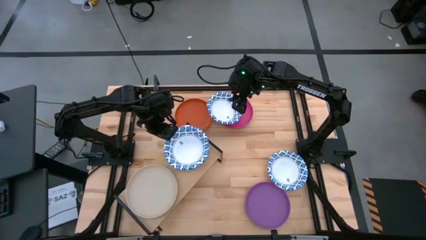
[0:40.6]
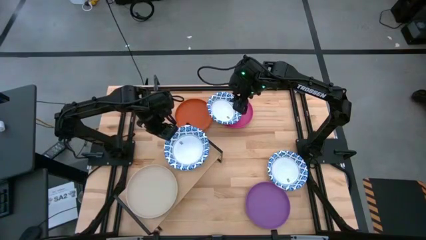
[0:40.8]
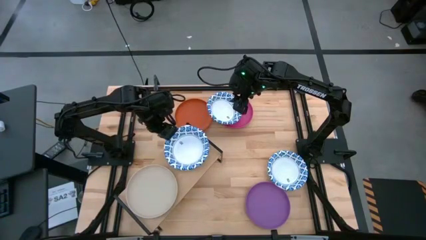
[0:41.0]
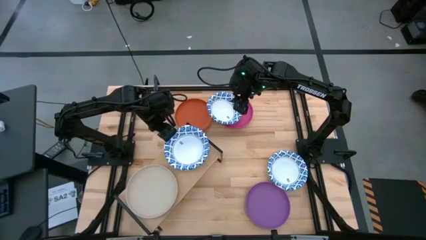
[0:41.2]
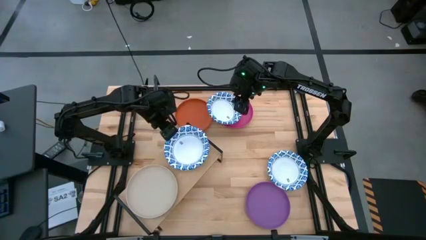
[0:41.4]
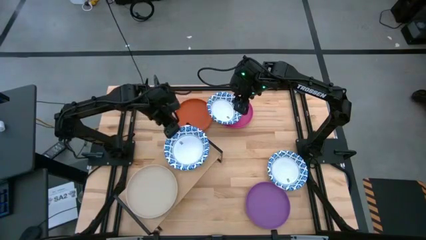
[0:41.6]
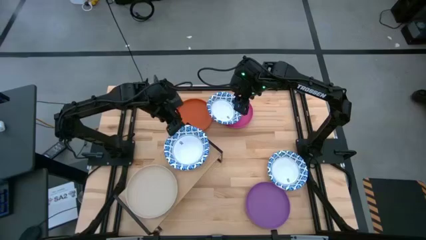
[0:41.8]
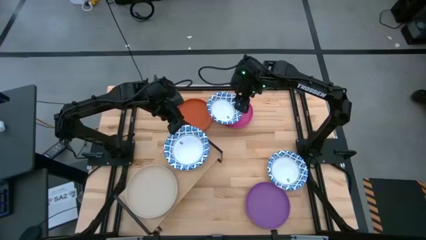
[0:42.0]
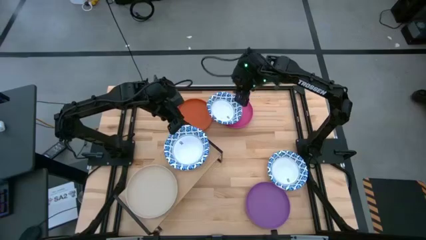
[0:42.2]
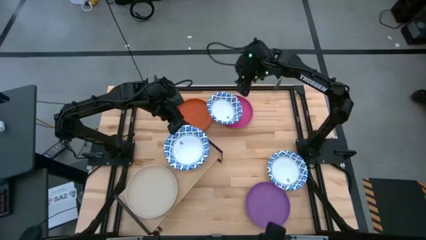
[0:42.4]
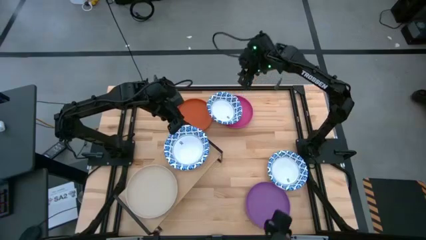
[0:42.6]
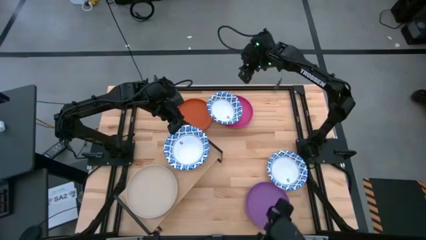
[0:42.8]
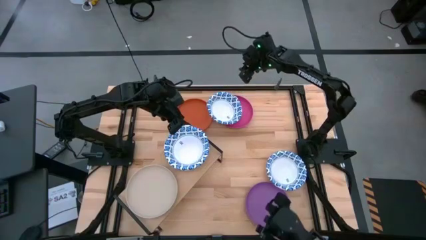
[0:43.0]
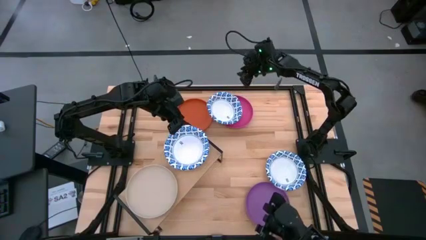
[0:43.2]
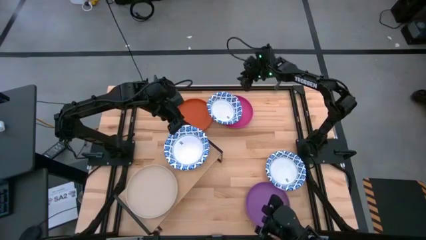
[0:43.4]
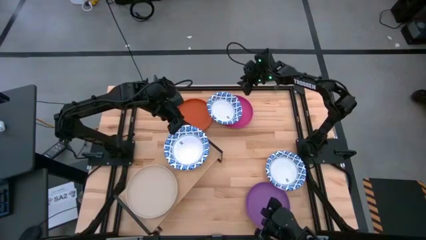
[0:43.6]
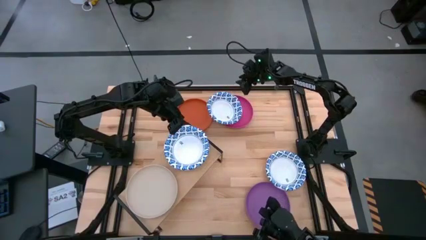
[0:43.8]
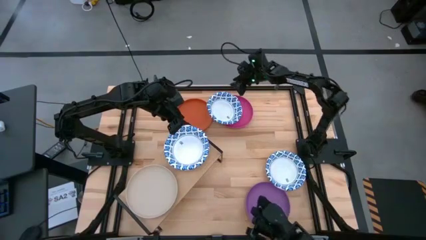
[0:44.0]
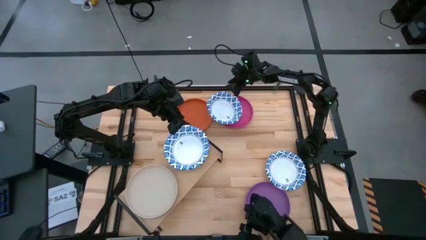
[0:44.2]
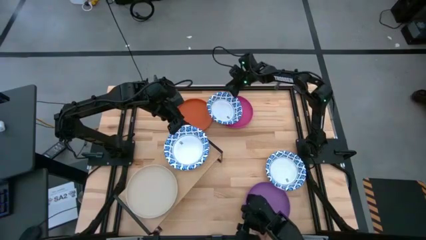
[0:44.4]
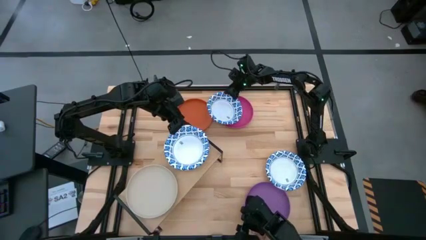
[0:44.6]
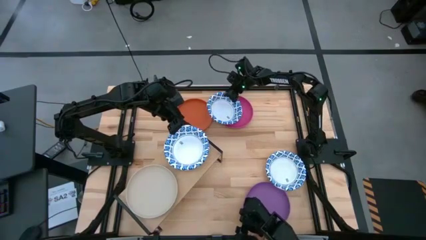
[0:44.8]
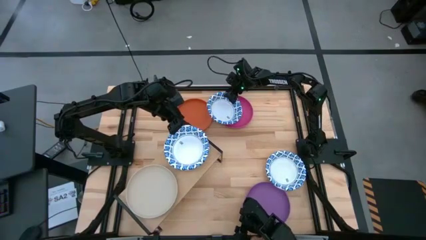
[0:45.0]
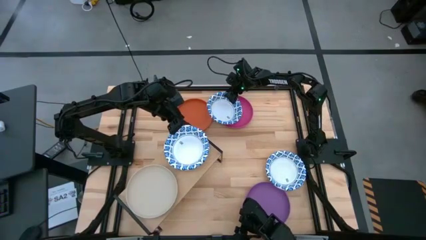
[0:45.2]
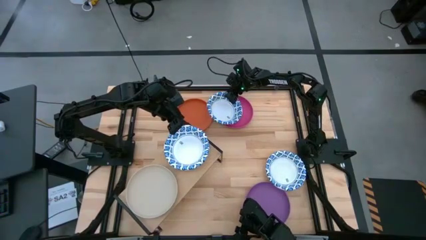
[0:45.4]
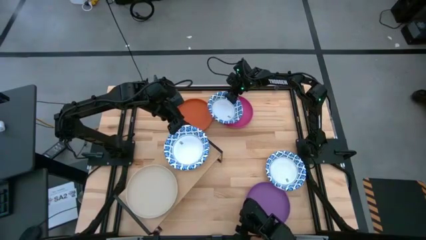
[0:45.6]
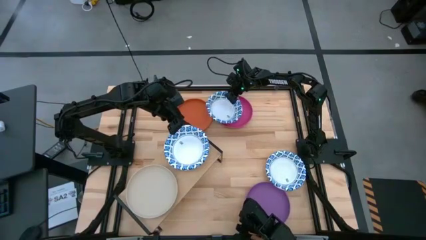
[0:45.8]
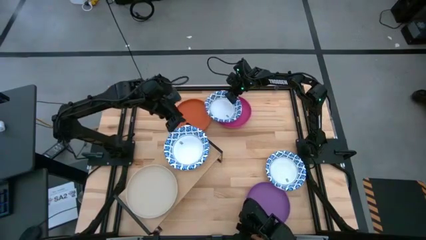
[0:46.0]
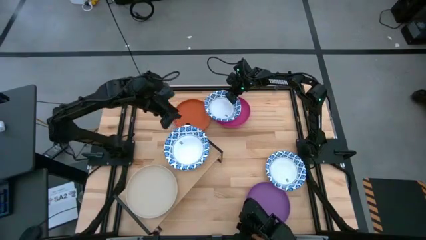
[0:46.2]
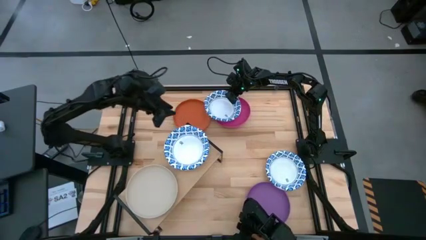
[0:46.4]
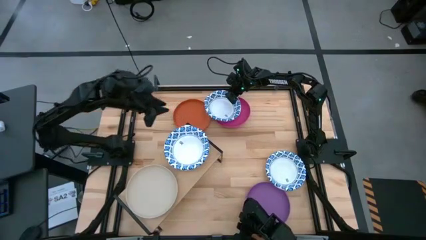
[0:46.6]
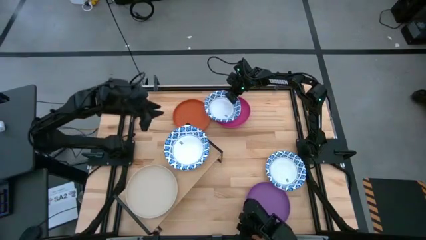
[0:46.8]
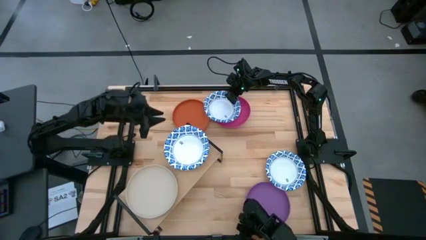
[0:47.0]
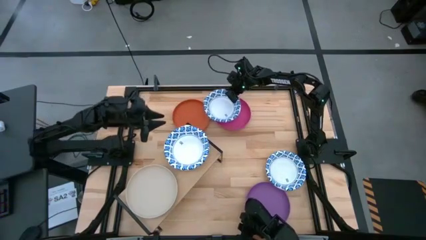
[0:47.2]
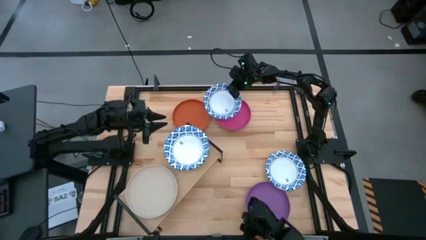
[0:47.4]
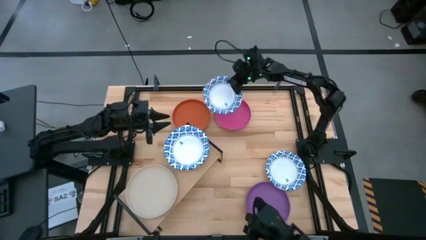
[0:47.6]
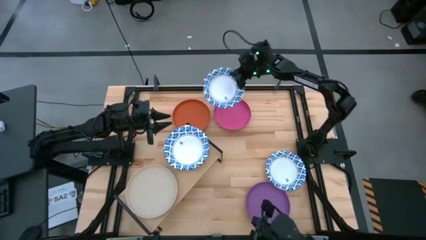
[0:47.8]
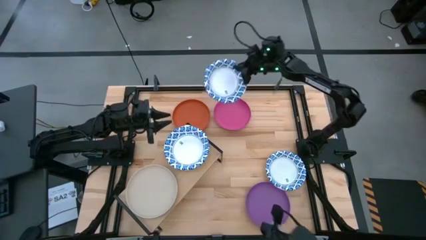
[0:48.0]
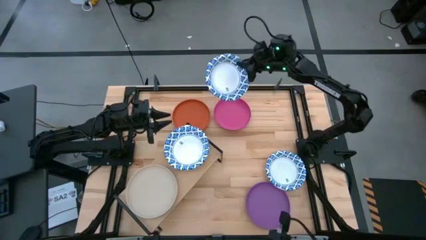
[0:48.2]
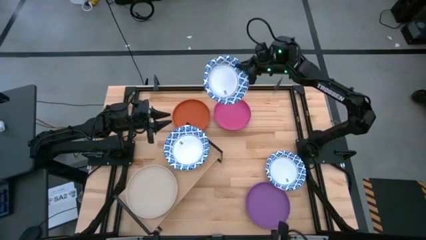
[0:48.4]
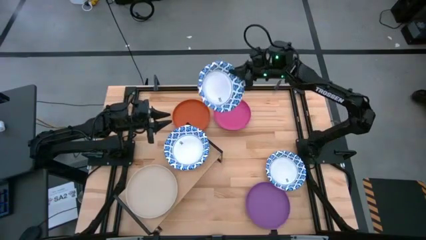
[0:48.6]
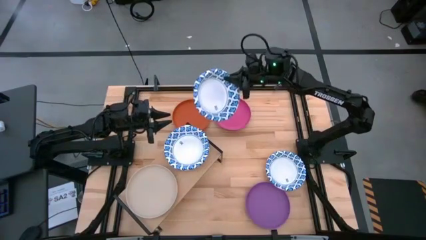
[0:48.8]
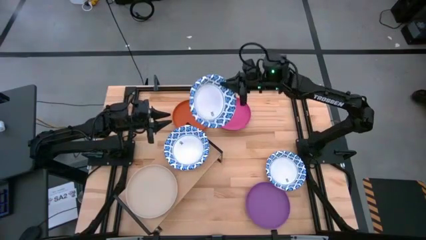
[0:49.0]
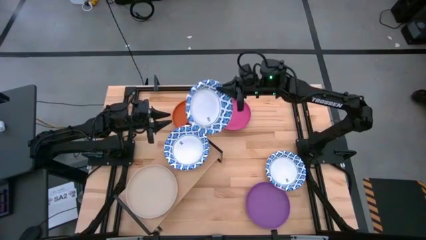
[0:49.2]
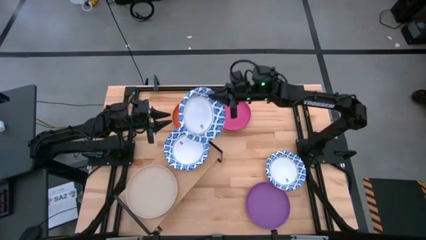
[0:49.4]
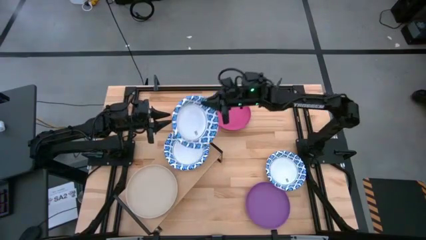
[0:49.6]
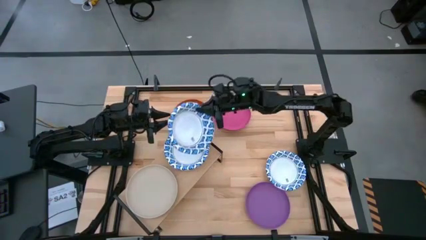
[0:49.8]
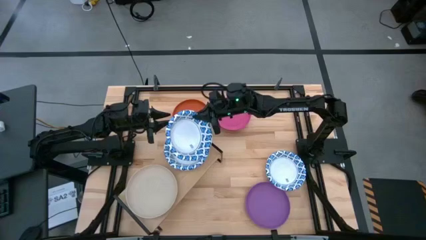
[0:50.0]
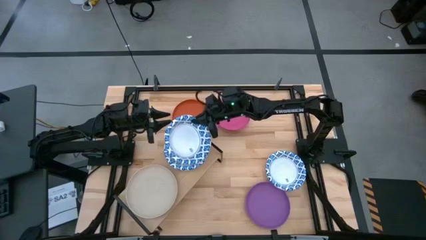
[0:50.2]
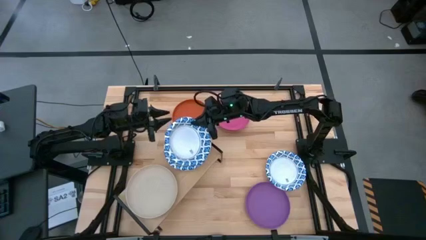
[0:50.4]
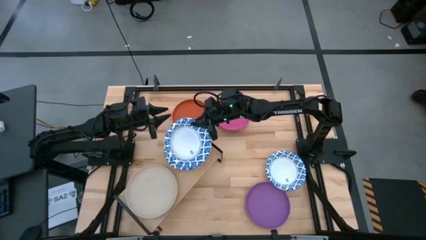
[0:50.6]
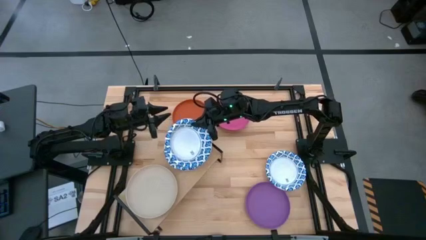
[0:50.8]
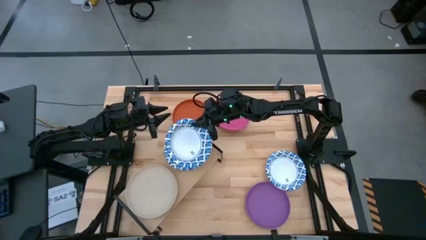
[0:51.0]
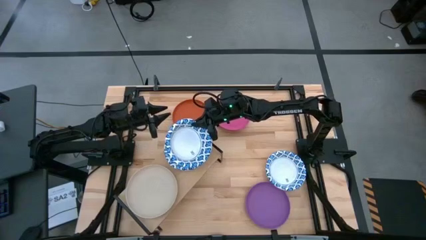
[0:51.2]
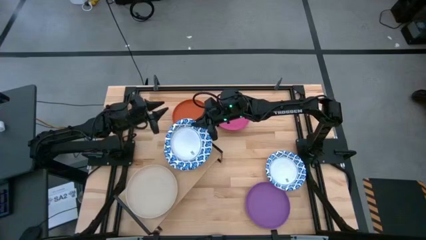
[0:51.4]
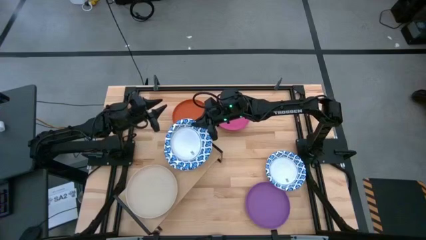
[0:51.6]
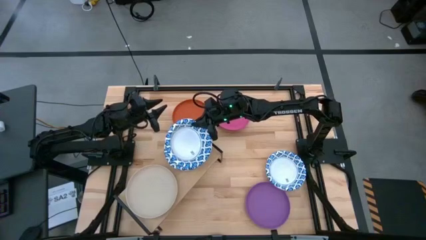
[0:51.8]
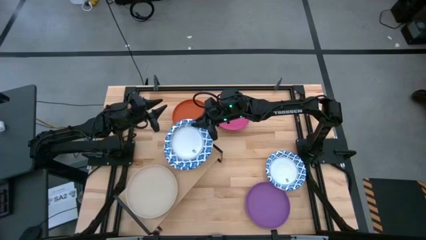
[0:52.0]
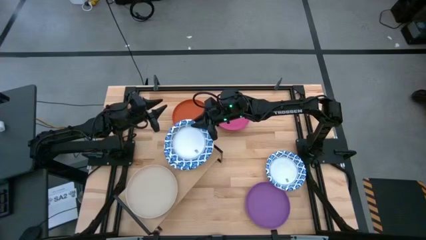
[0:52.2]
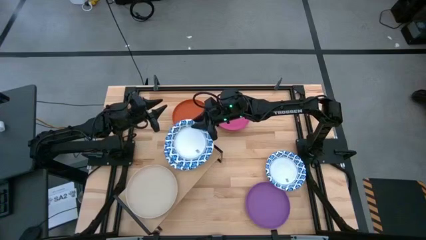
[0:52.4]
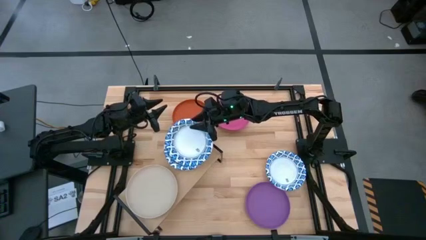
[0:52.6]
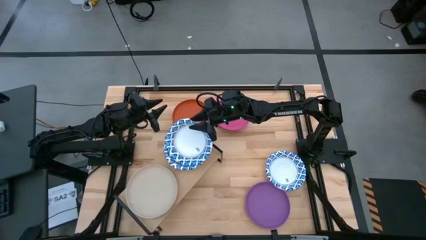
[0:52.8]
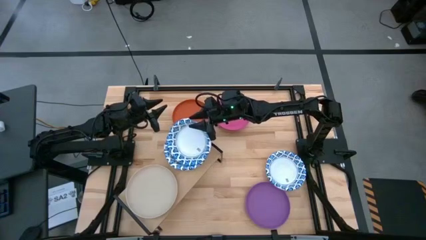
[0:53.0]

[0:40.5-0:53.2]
Task: Place and stack plates onto a shelf
Stack the white bowl on top of the other white bowl on the shelf

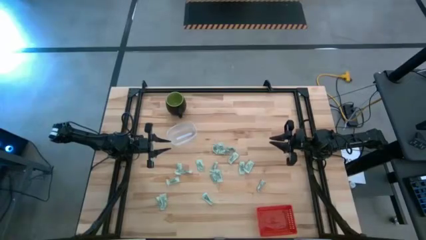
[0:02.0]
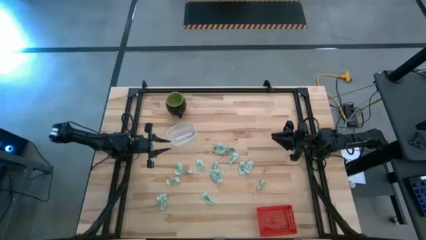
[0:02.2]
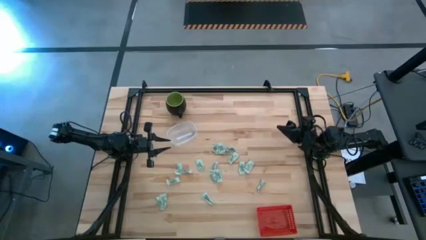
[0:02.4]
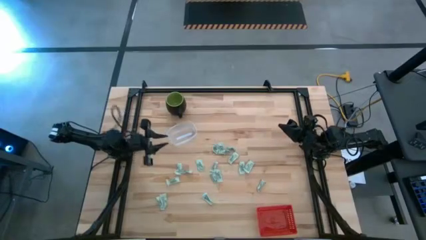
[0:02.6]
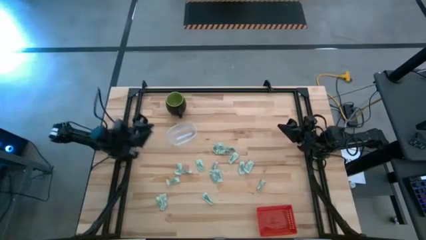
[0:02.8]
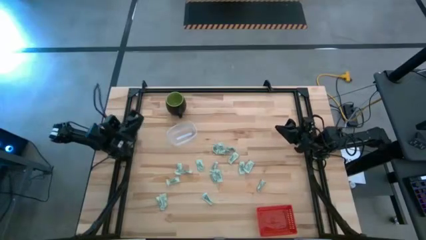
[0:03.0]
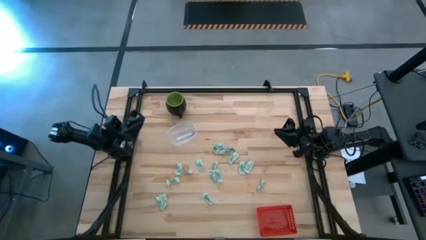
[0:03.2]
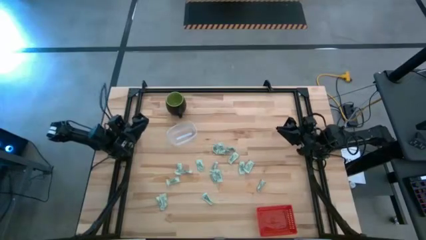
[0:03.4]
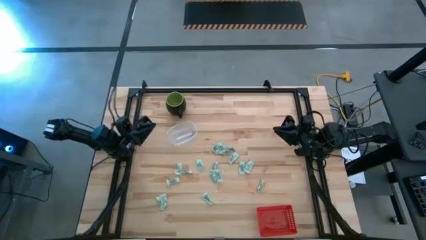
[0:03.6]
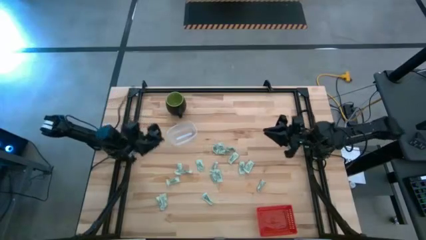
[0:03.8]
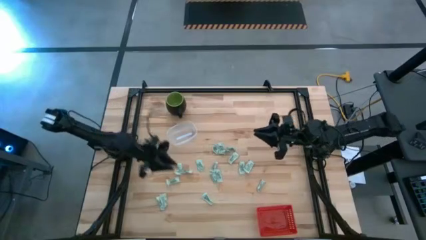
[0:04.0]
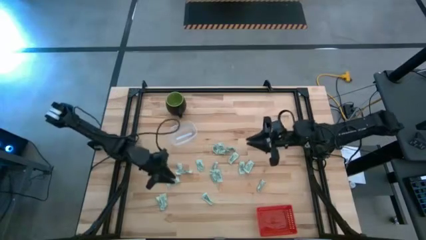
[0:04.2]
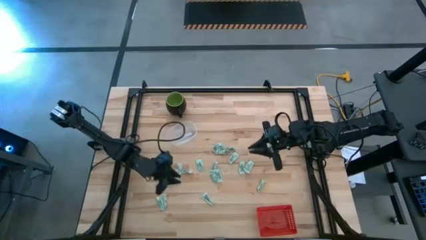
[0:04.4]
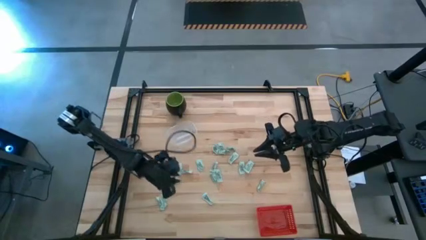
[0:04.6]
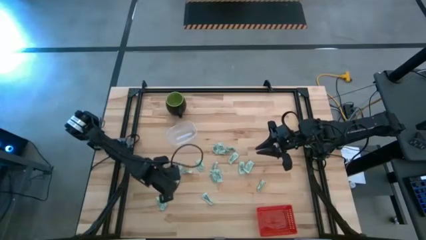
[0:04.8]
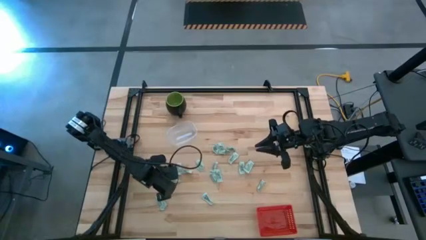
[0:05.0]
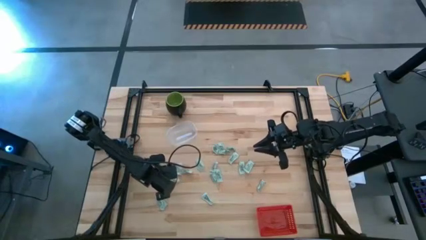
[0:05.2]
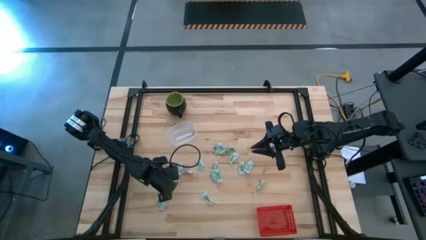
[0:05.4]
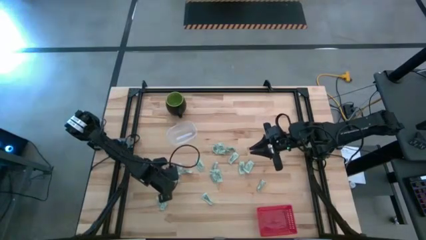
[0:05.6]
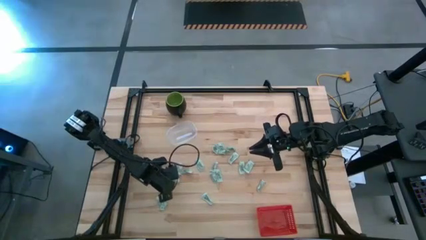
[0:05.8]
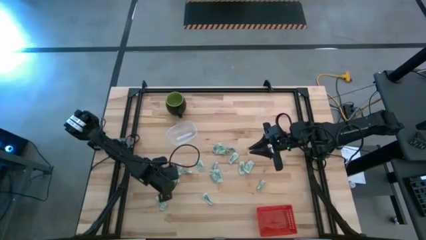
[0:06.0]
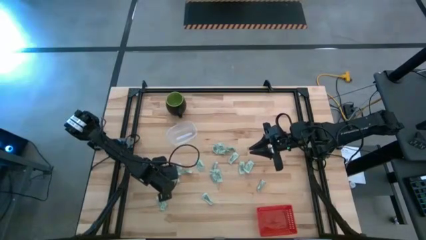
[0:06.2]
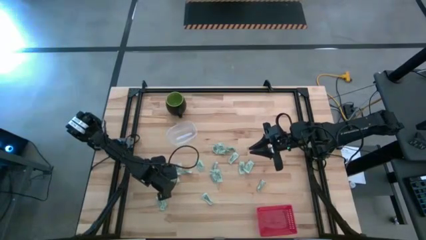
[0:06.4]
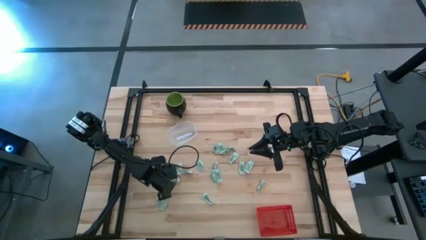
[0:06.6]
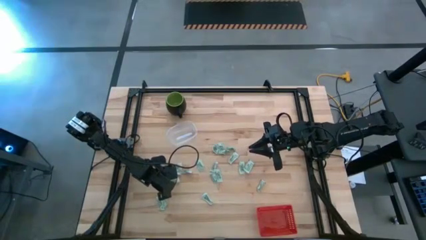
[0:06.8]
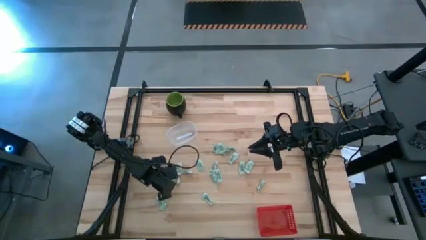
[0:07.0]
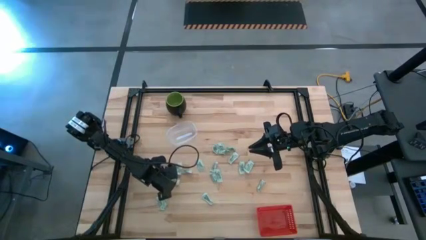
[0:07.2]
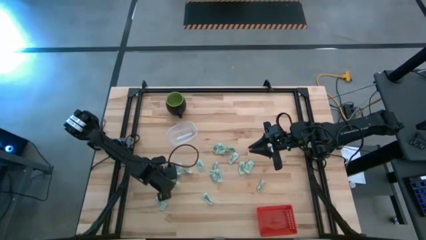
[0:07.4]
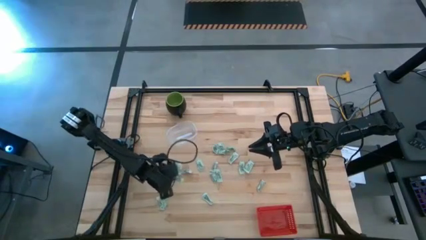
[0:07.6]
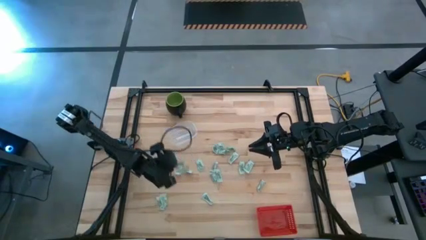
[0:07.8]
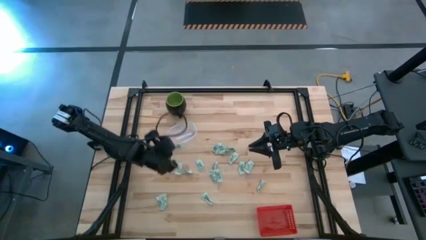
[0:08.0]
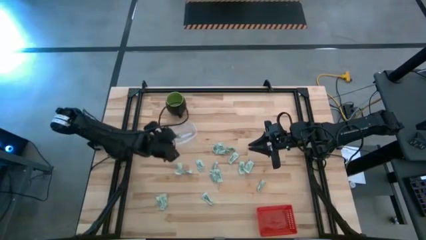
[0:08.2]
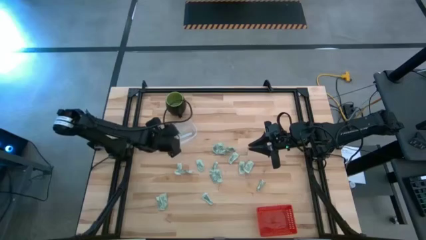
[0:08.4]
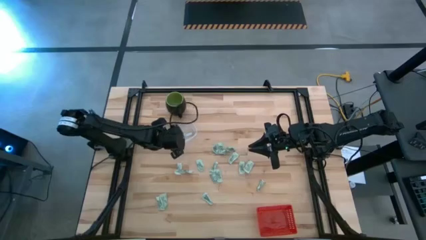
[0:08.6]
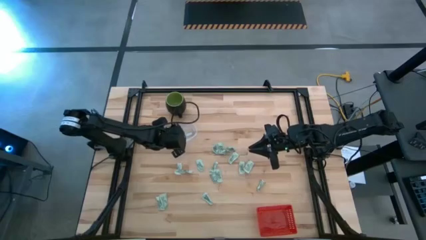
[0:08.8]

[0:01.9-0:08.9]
Task: Pick and place items into bin
Put the green stevia packet into the transparent bin
